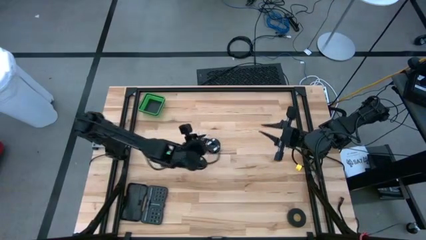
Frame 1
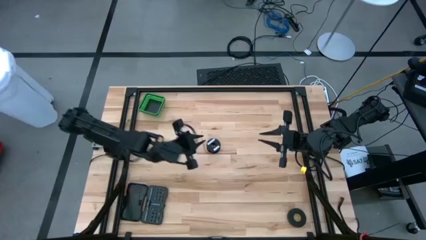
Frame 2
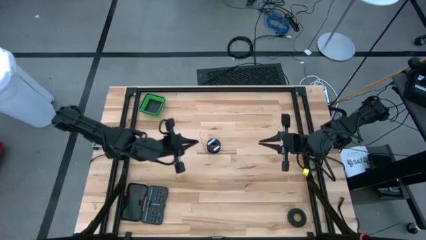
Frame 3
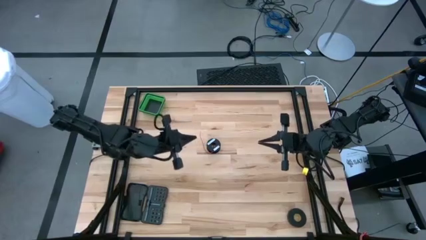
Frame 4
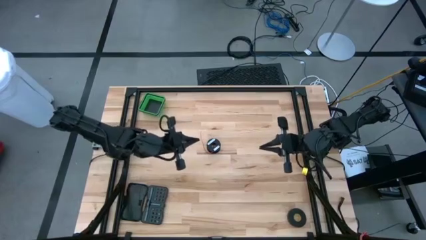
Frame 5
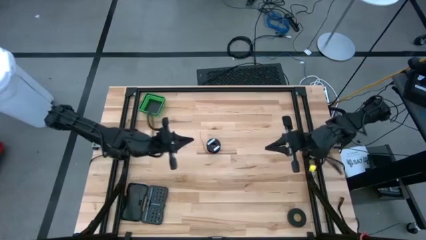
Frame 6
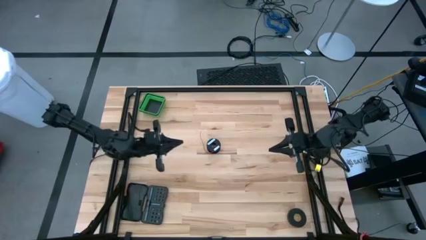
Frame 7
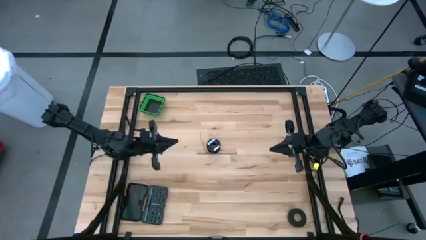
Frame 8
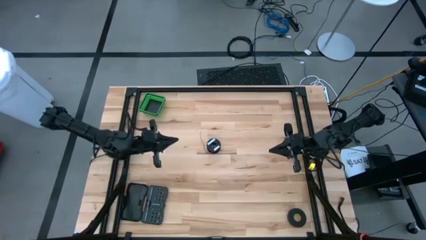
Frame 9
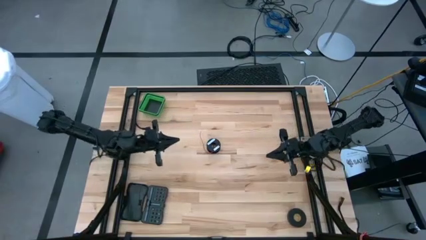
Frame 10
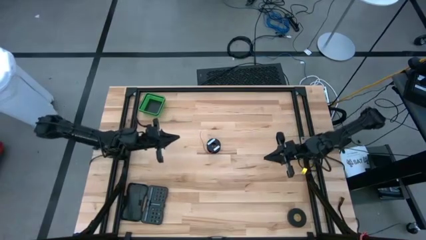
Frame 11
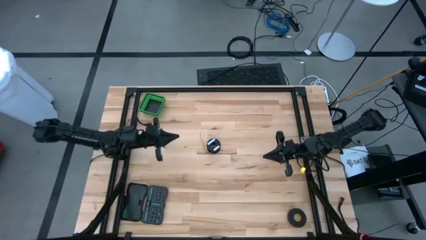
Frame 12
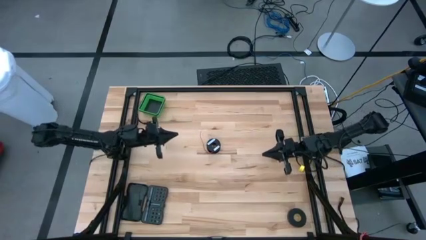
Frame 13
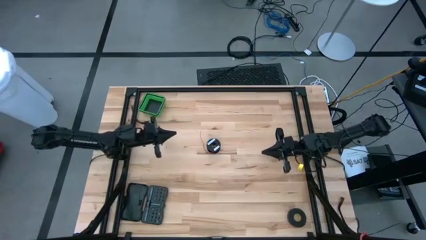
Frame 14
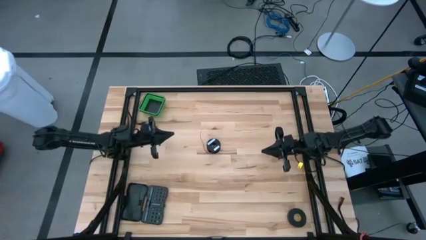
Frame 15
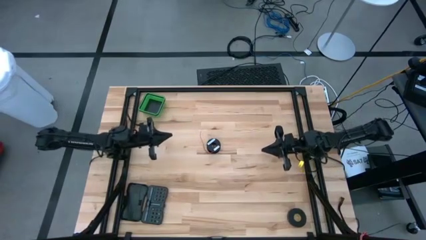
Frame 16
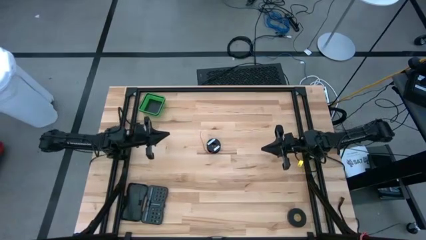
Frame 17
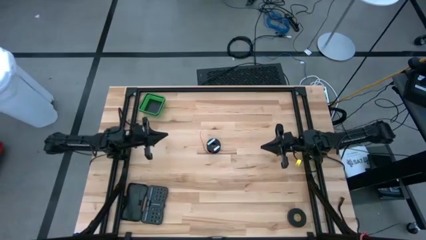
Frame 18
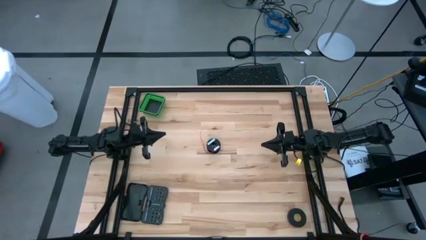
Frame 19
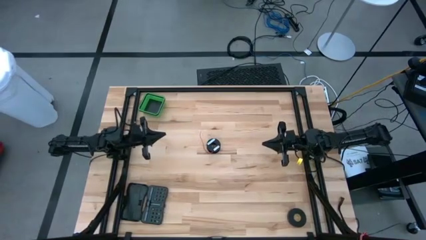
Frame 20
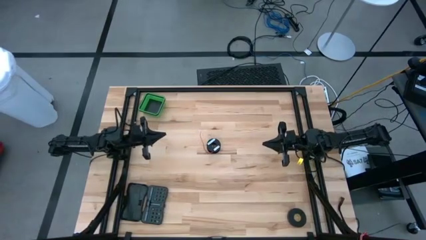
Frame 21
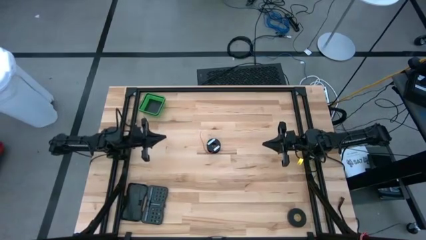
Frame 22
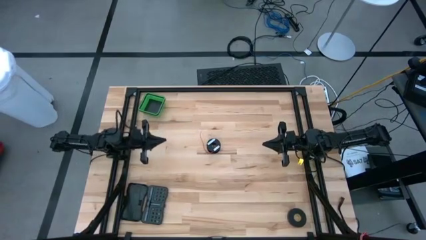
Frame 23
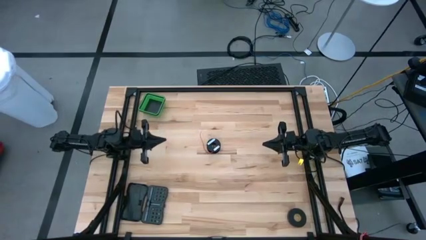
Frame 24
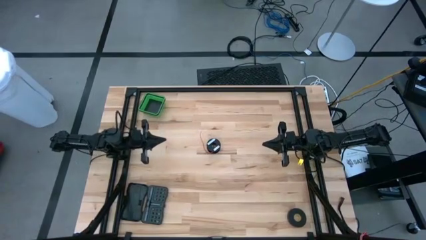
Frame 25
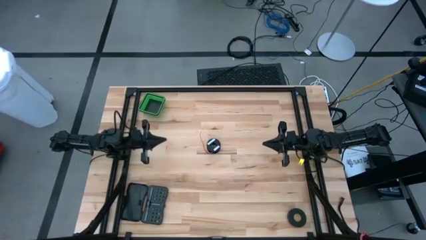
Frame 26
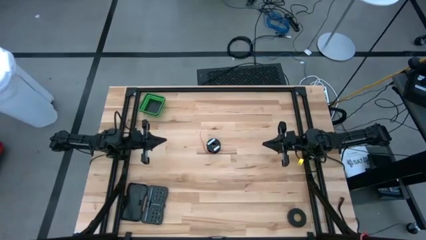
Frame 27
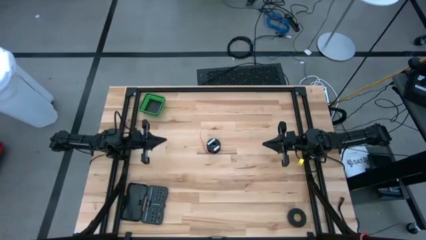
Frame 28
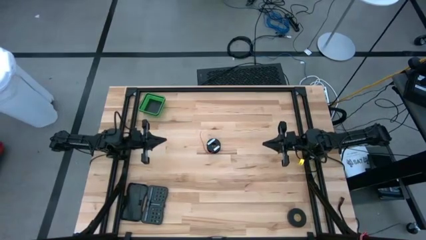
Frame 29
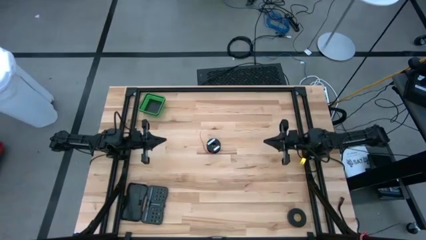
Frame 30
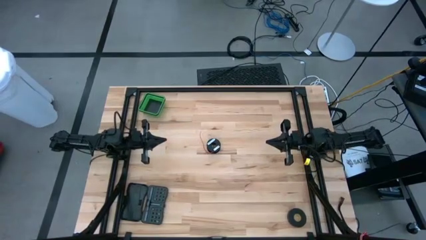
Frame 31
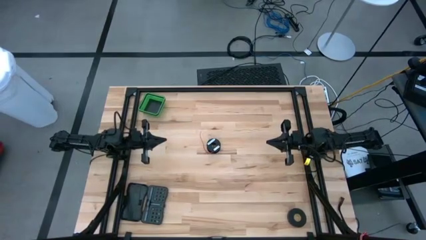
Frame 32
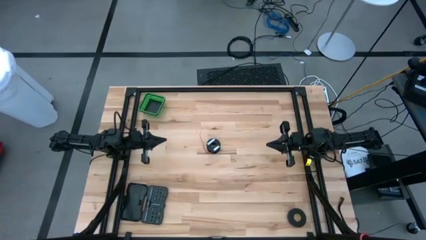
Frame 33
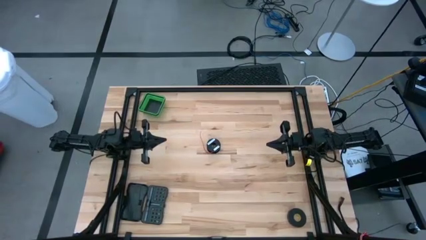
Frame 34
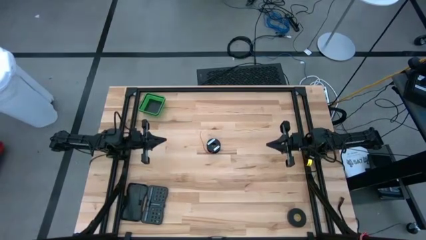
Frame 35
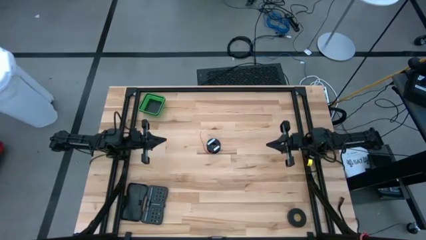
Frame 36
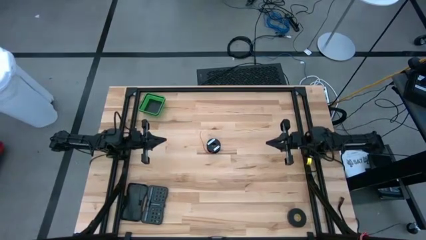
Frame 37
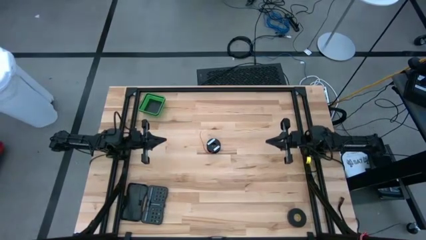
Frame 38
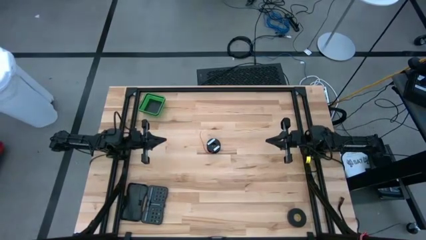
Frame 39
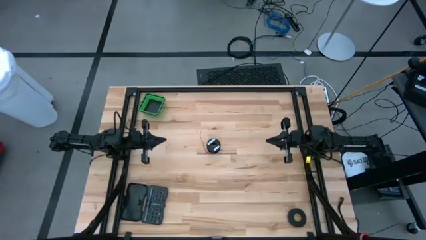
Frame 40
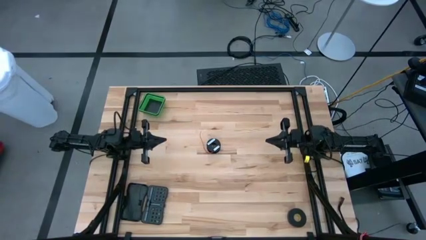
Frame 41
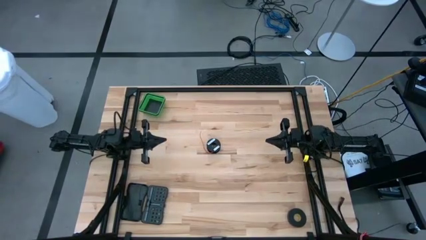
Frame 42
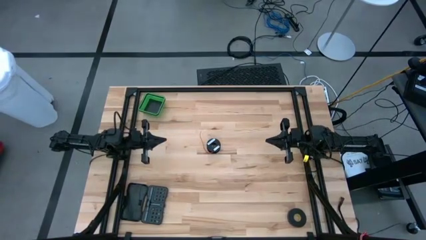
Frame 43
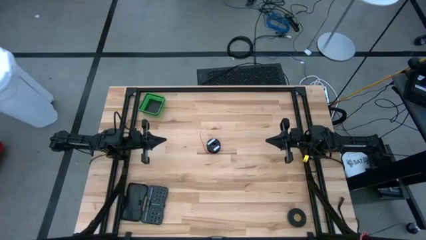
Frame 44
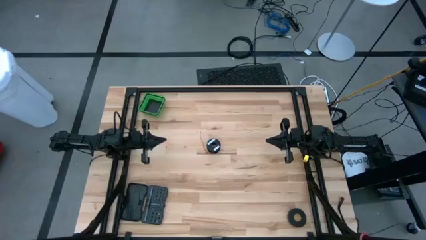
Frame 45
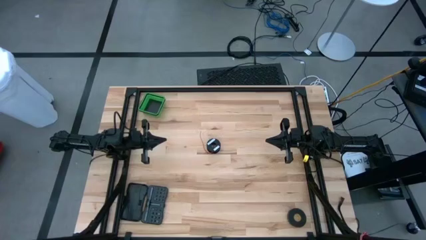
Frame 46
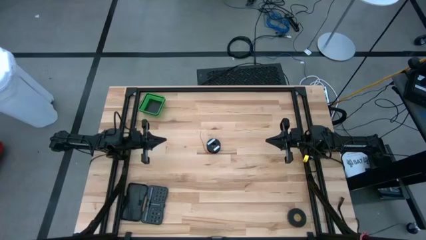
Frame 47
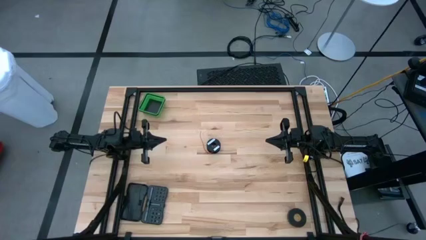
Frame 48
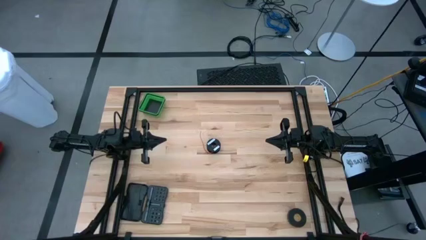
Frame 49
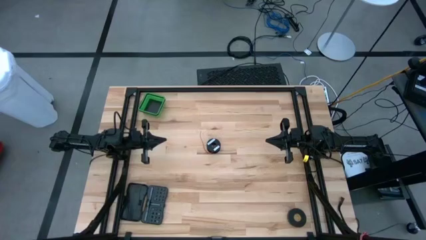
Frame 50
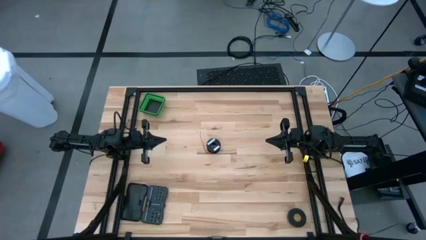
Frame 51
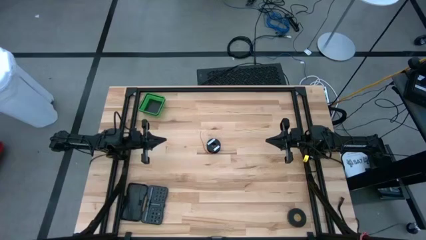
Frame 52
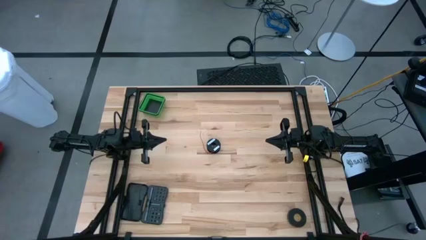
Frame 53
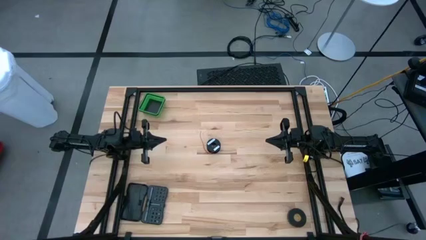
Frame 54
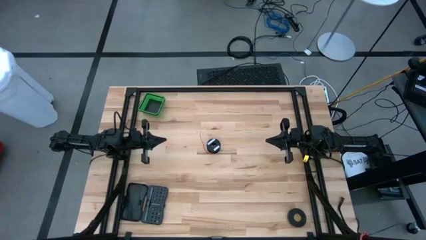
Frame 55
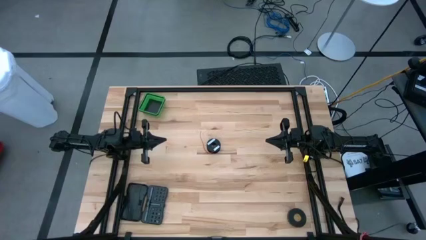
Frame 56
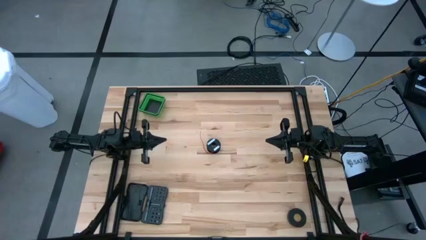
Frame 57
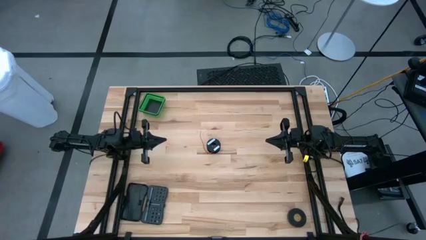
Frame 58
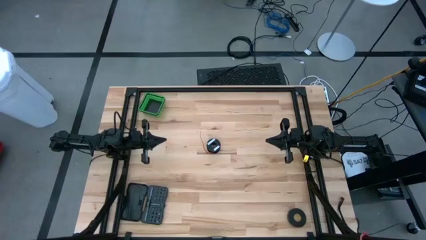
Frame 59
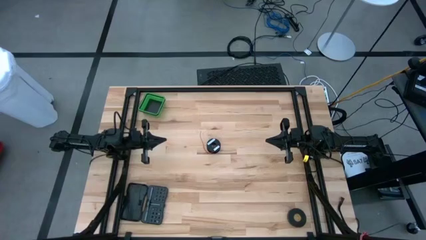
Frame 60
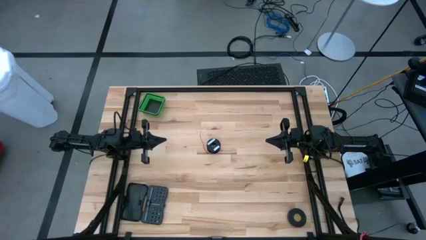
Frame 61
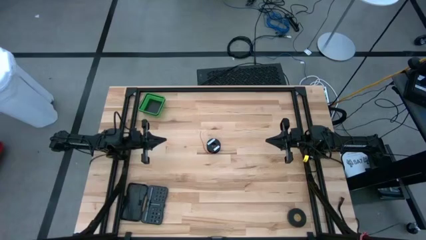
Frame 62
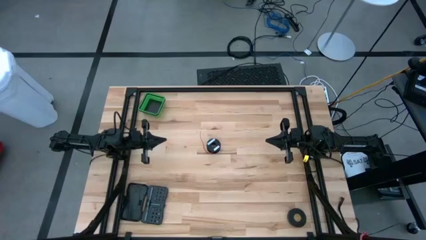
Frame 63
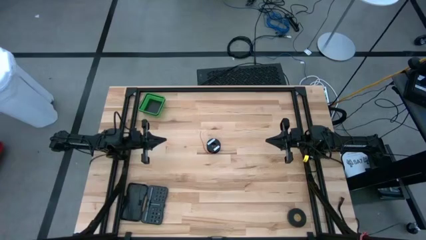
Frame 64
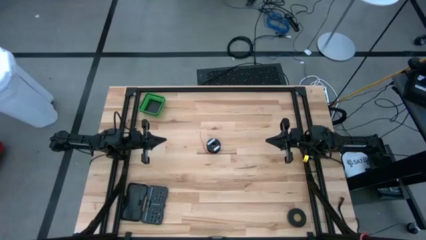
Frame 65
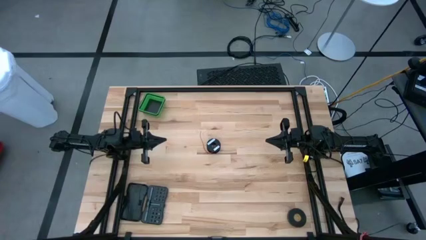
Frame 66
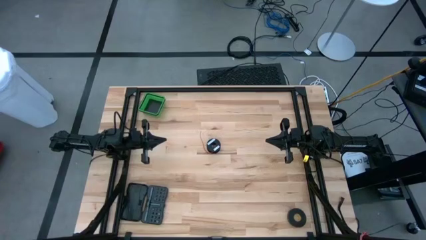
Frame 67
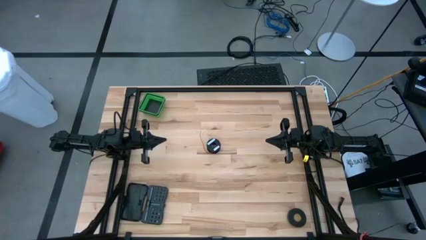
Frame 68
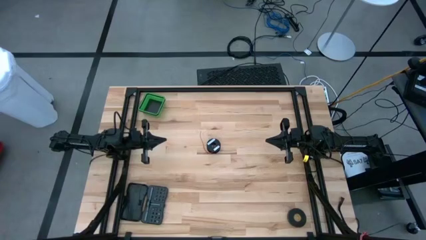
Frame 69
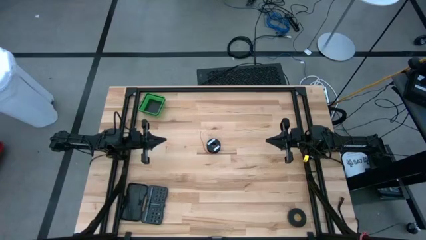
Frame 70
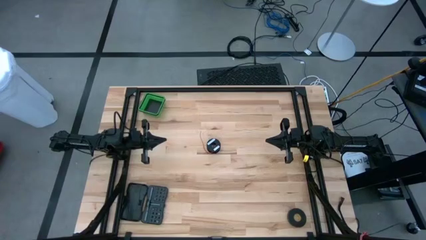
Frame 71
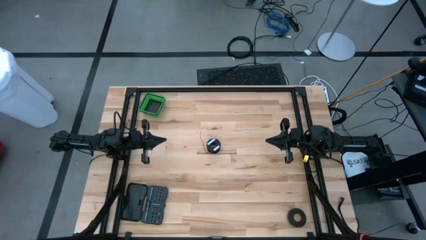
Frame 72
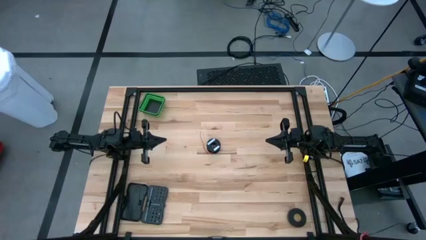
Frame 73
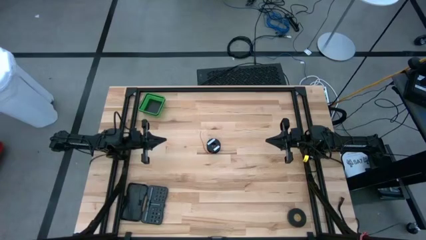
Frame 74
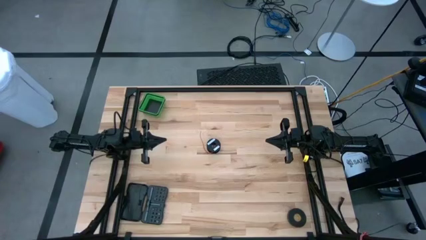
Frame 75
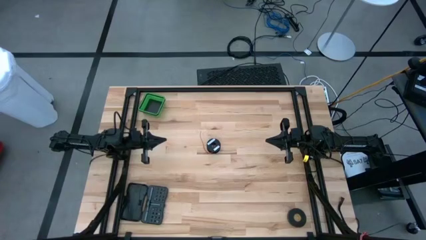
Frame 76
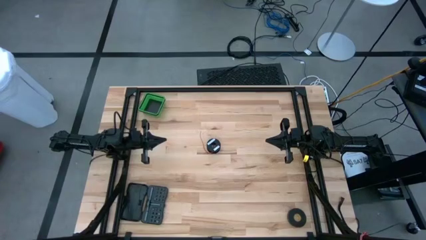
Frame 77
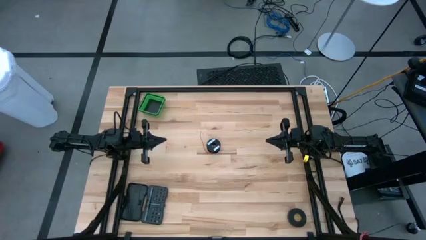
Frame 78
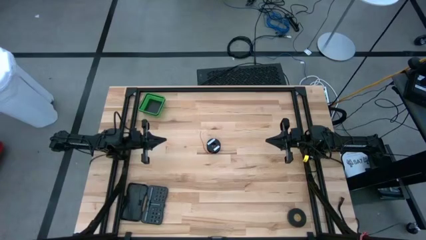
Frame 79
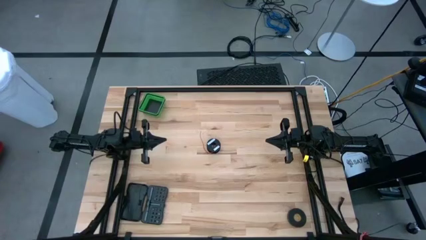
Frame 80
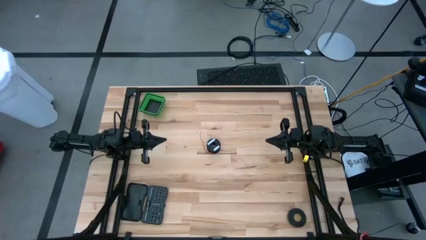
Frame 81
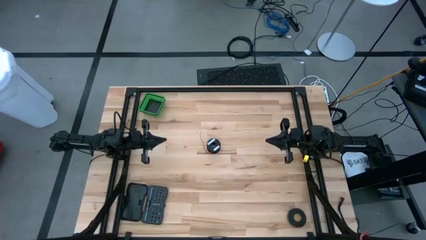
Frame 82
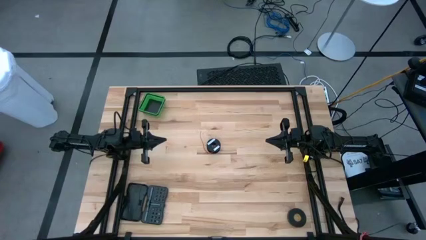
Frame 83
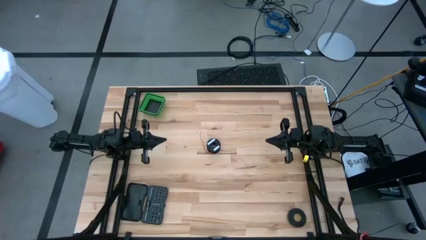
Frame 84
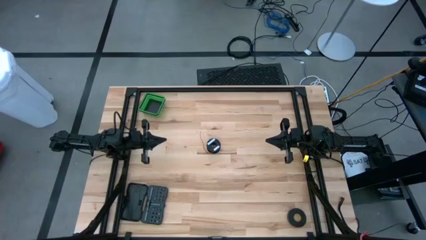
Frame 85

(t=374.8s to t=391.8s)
Task: Coil cords
Return to Home Position
